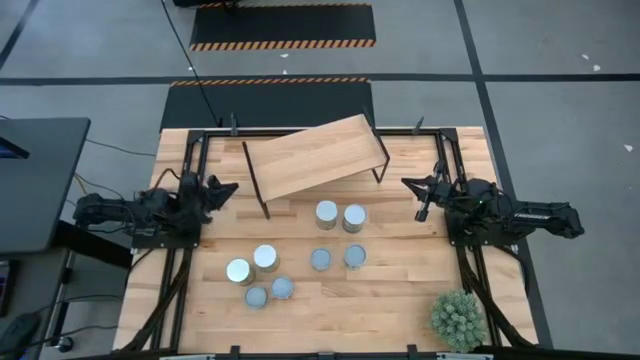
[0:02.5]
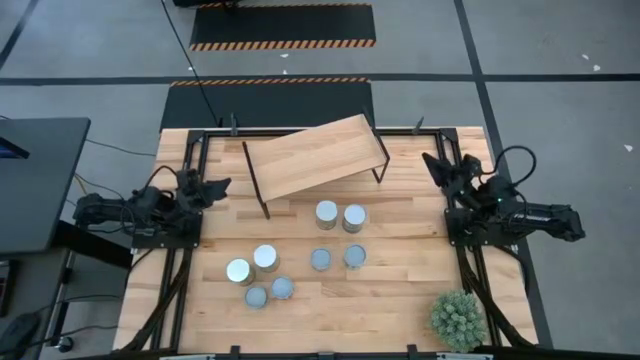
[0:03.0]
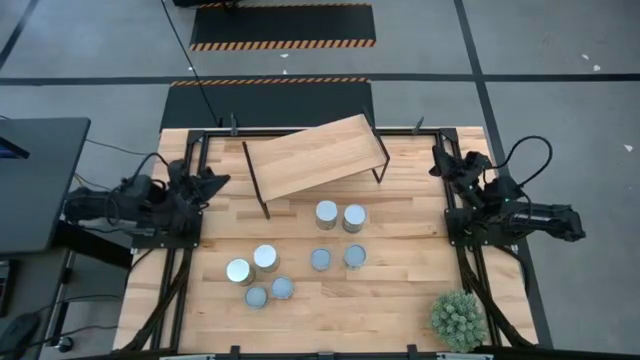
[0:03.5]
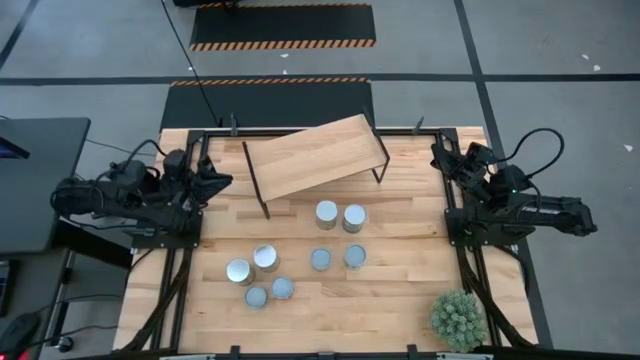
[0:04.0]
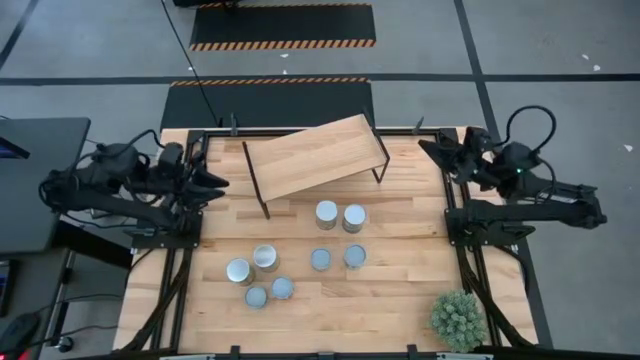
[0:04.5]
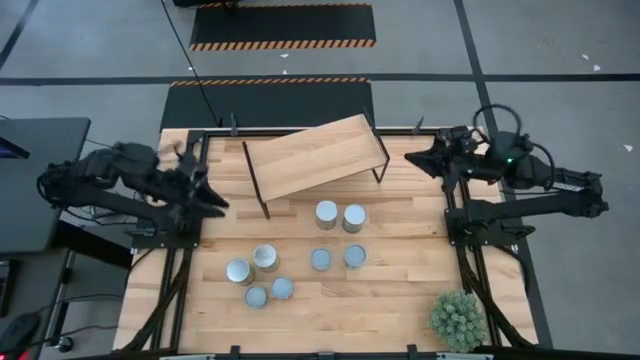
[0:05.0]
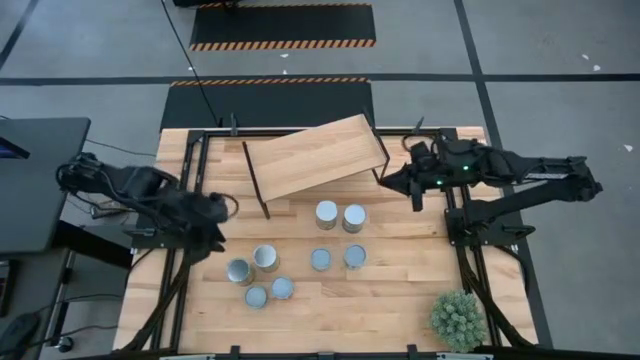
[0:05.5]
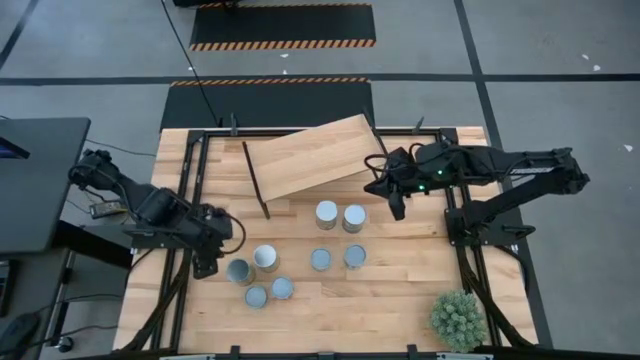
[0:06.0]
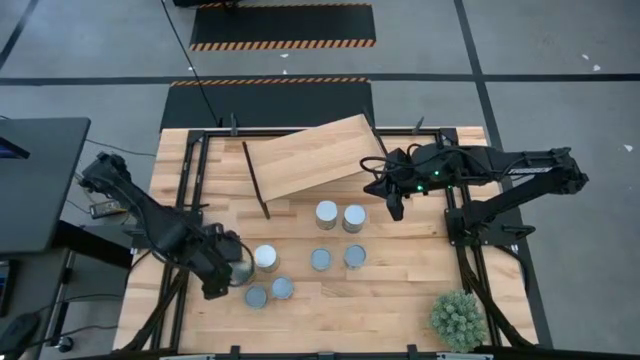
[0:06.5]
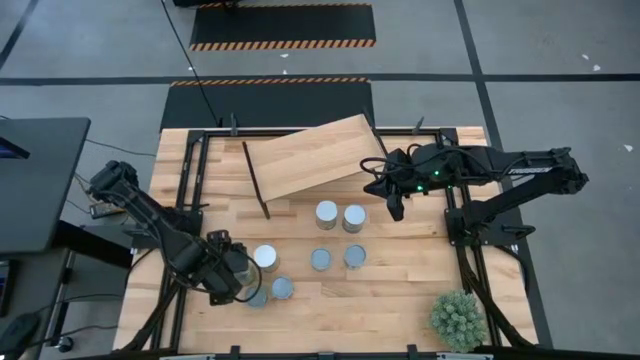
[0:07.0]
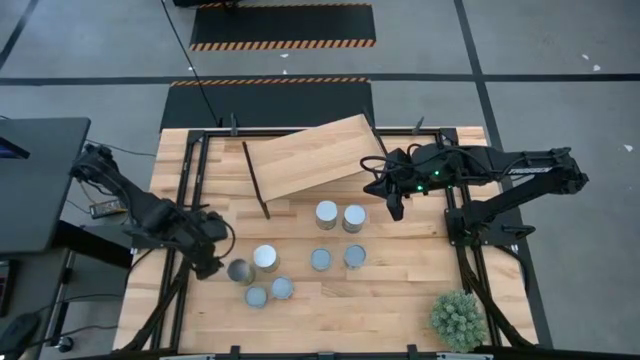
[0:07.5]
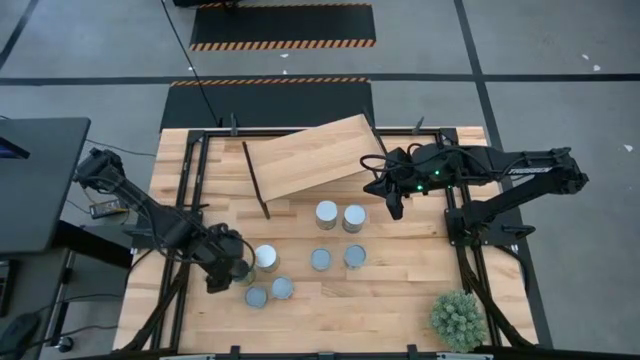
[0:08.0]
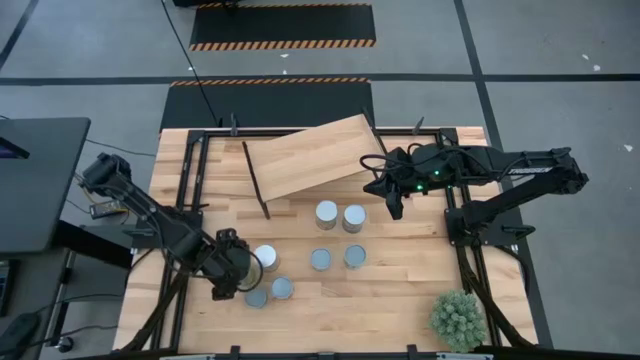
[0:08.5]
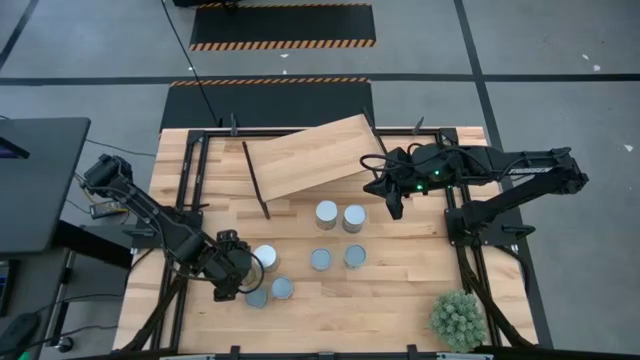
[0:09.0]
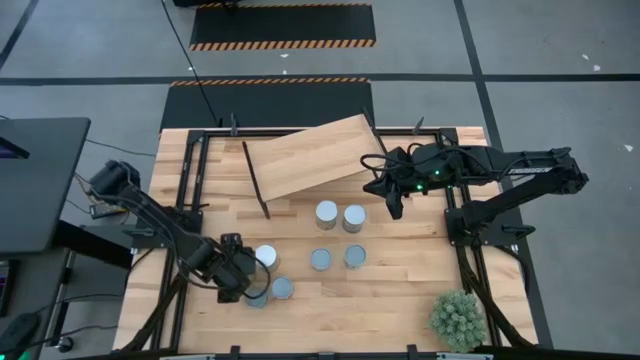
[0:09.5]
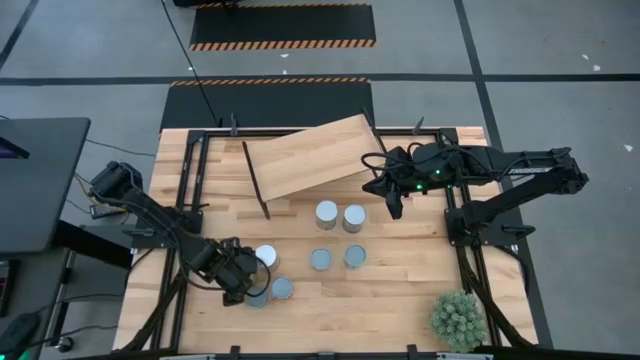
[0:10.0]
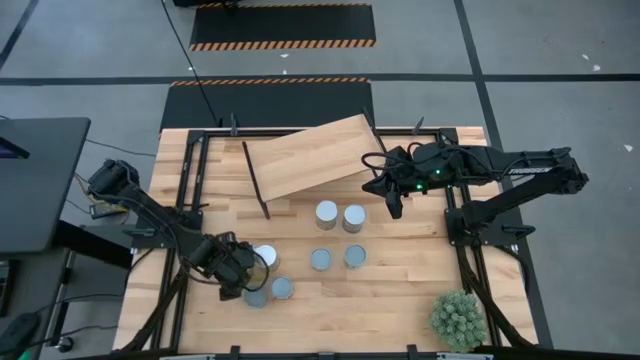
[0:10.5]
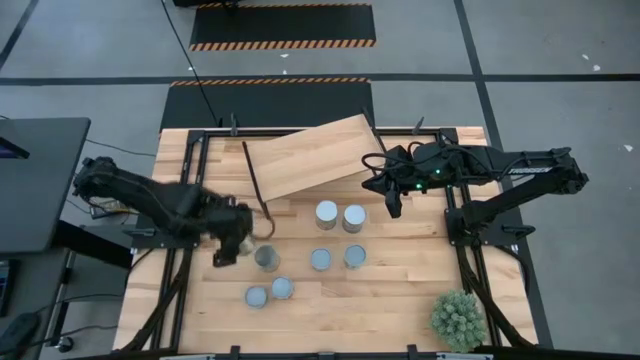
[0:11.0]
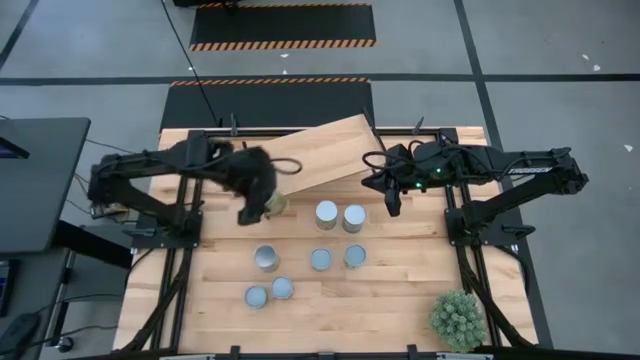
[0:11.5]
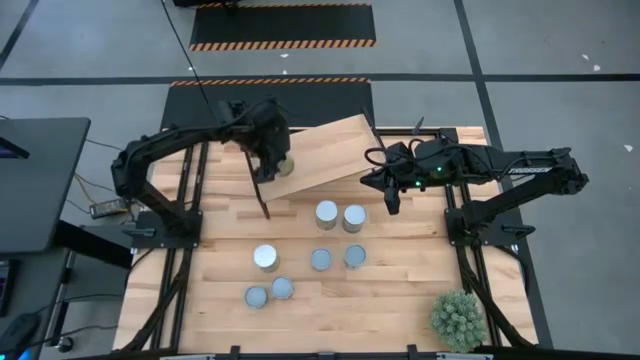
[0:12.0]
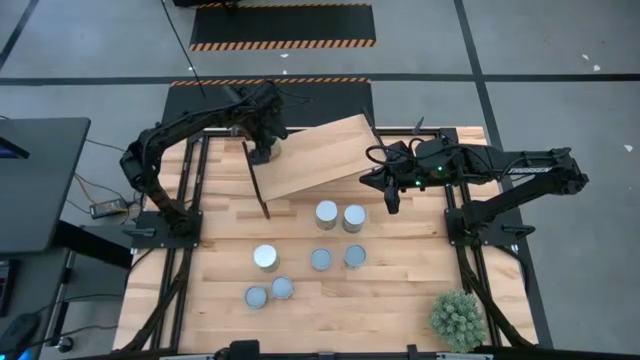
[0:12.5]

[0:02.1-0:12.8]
Task: Pick and place cans onto a shelf
Put the orange can on the shelf

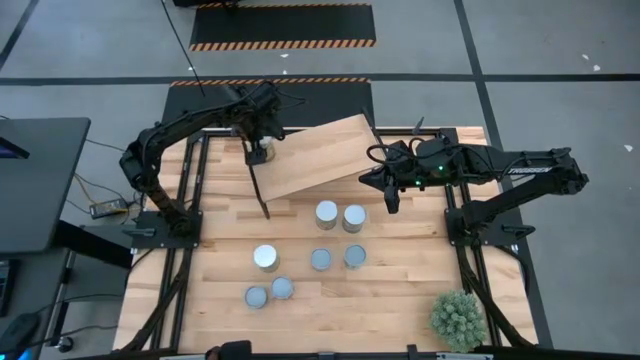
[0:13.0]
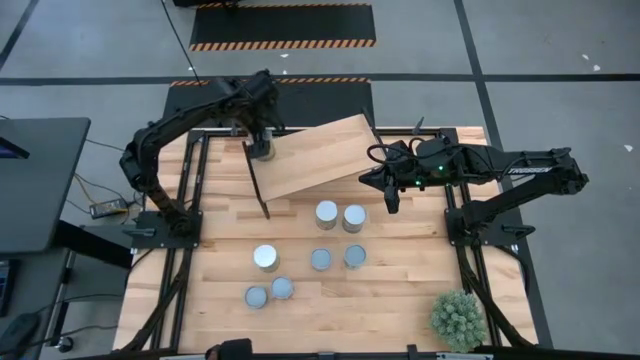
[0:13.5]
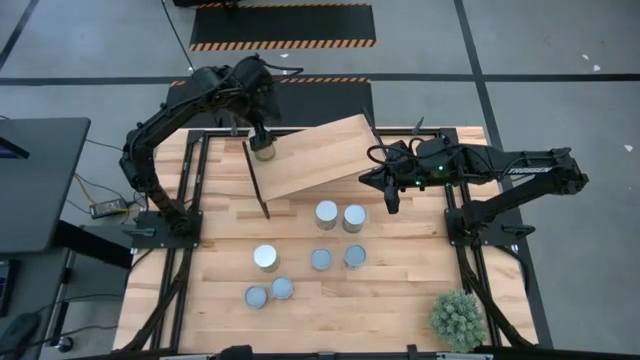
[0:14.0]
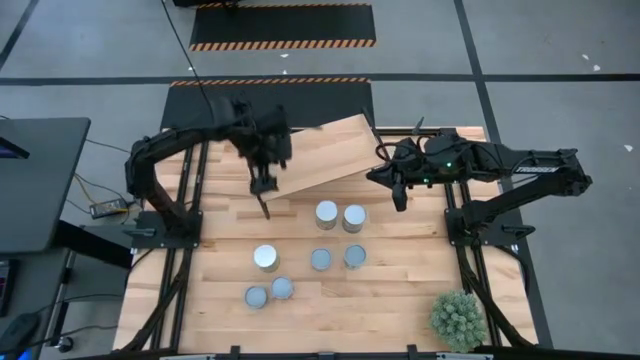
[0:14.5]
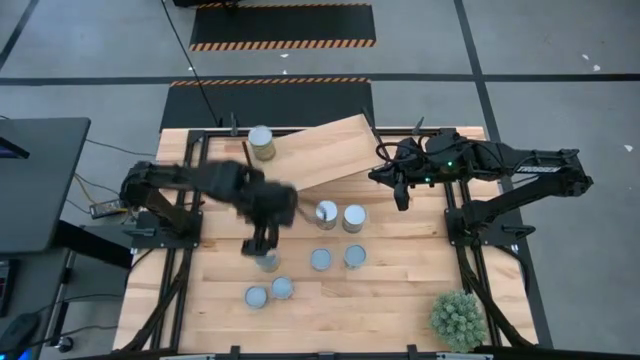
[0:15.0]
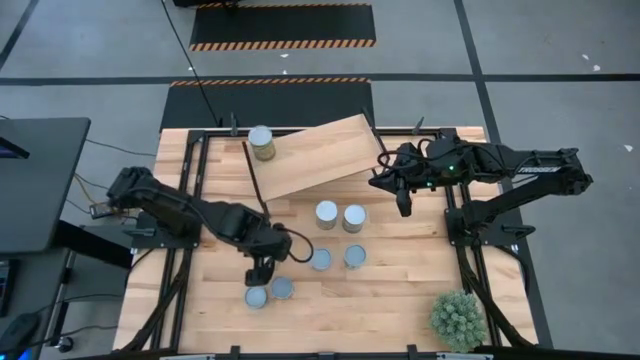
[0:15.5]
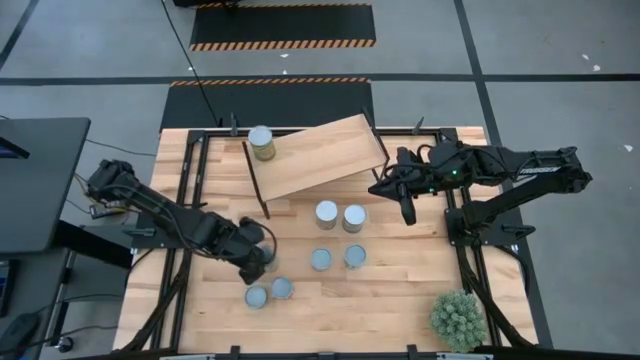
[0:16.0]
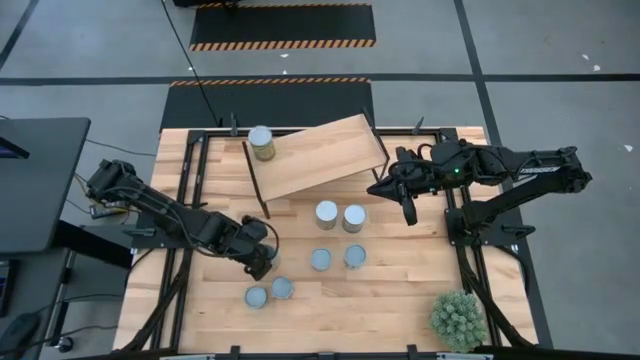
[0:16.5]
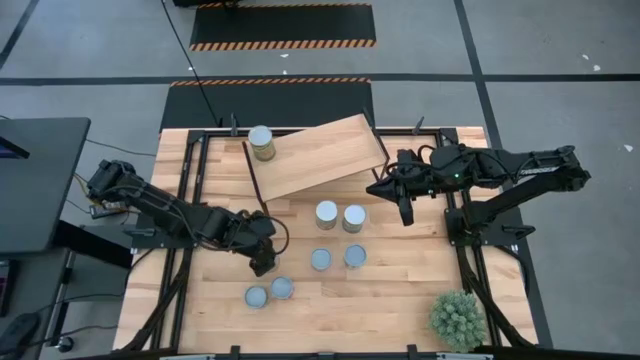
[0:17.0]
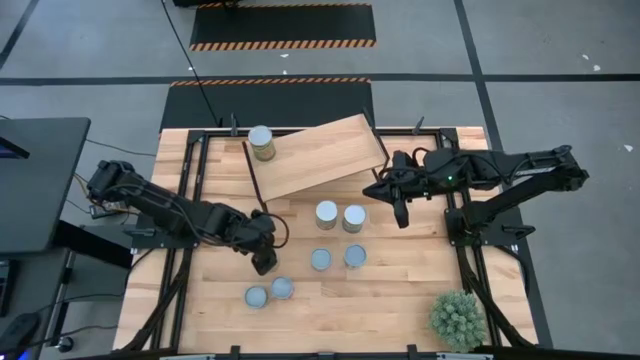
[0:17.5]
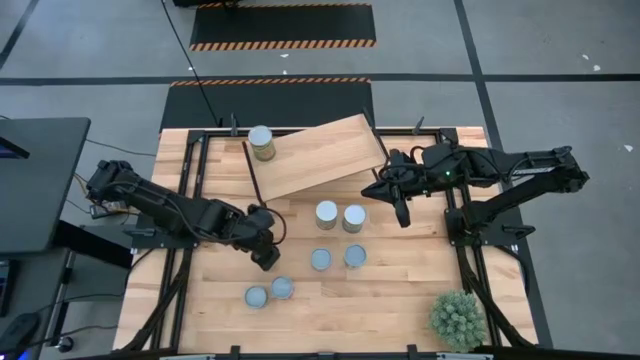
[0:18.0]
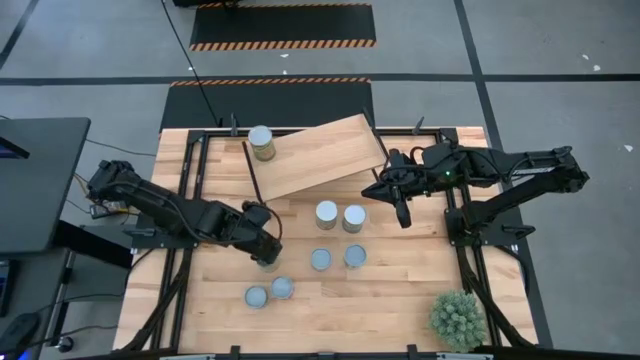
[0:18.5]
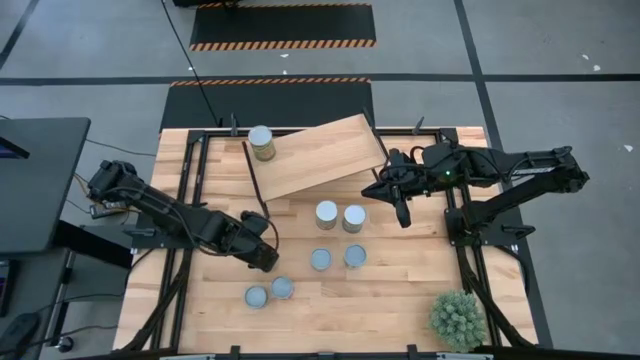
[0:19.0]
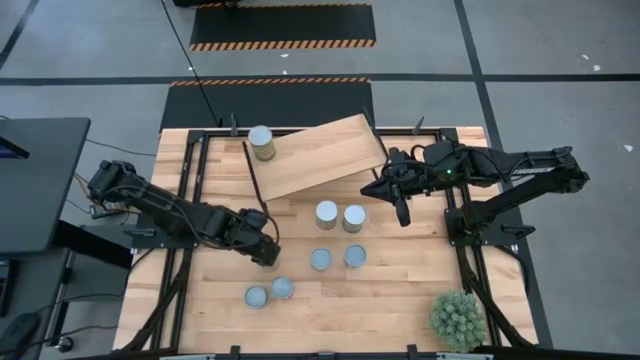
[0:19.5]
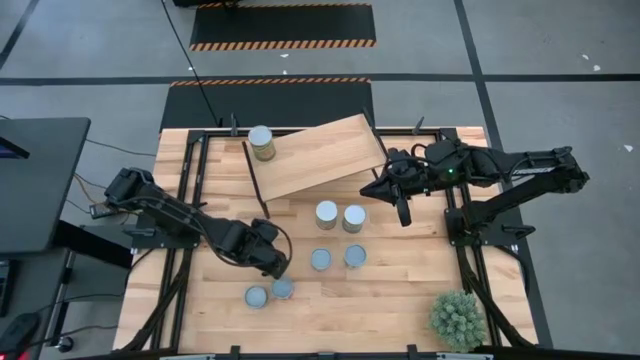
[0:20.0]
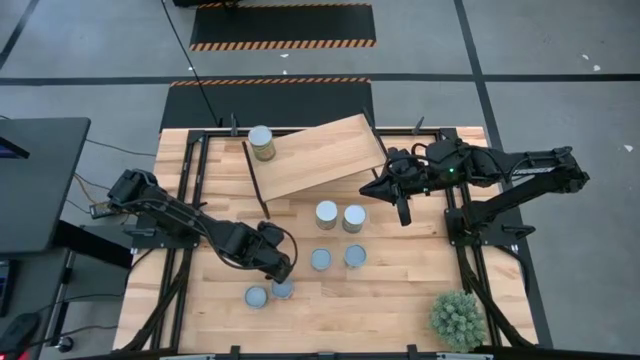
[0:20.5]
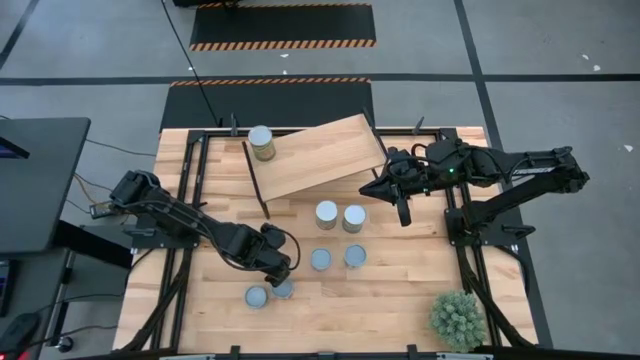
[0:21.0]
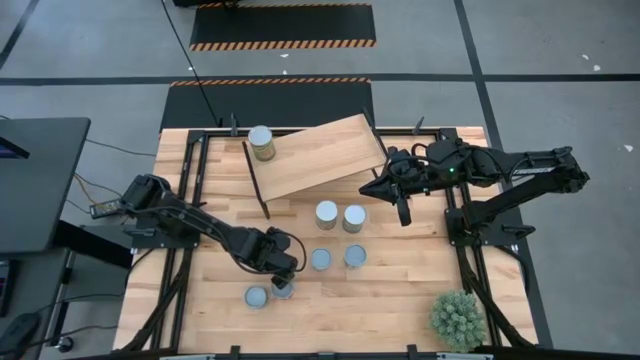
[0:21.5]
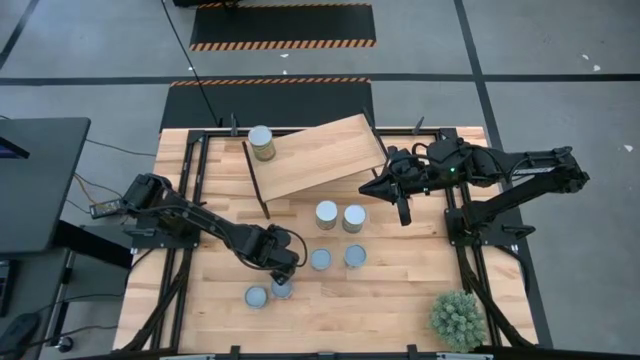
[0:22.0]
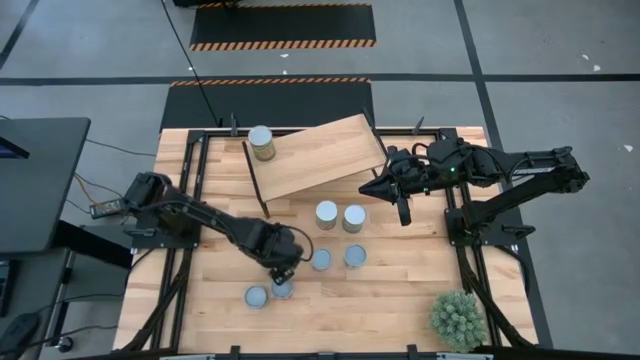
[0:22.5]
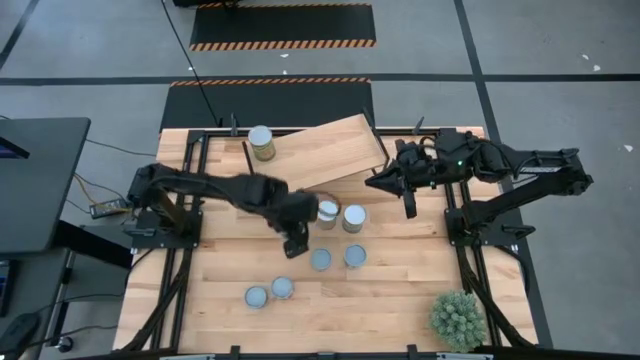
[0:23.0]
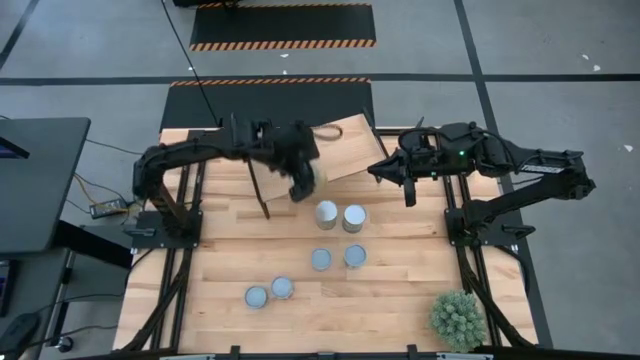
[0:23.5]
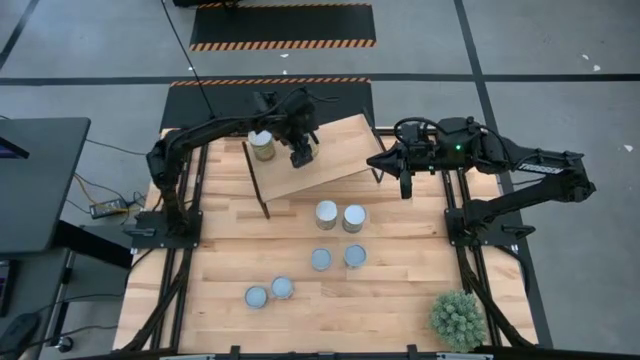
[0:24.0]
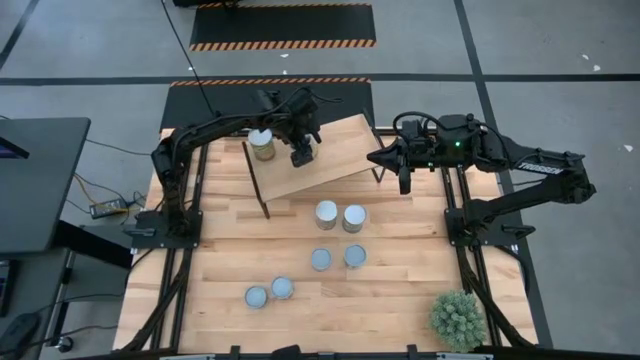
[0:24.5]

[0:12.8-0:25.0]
Put the carrot can on the shelf
